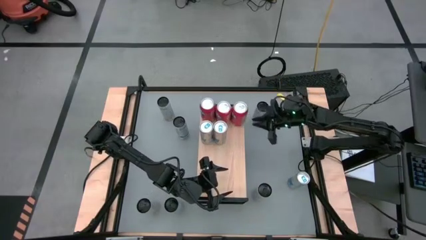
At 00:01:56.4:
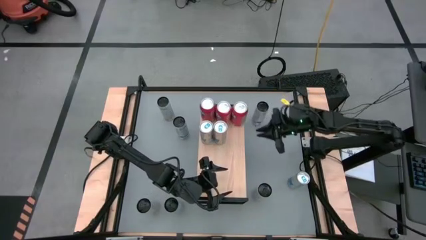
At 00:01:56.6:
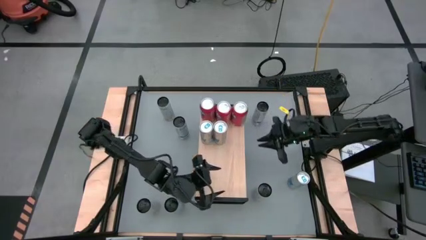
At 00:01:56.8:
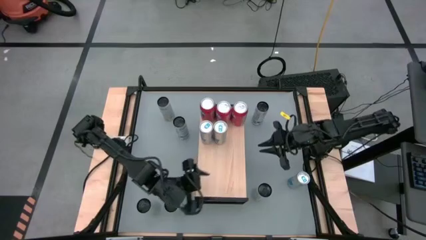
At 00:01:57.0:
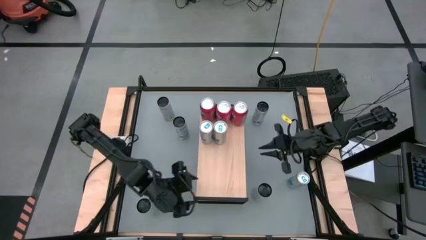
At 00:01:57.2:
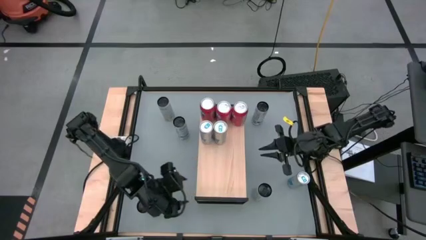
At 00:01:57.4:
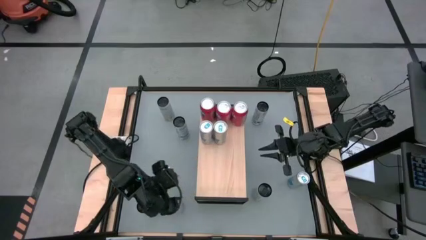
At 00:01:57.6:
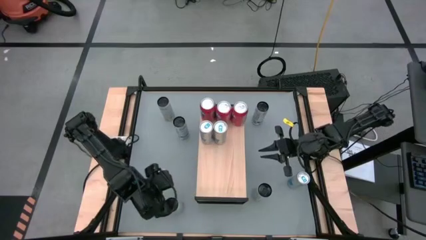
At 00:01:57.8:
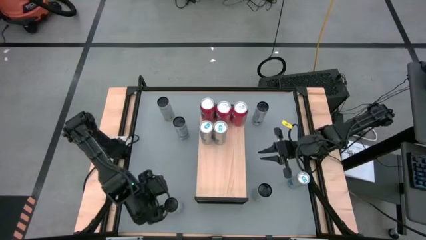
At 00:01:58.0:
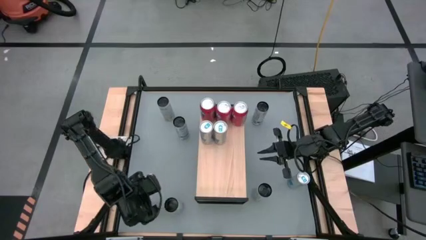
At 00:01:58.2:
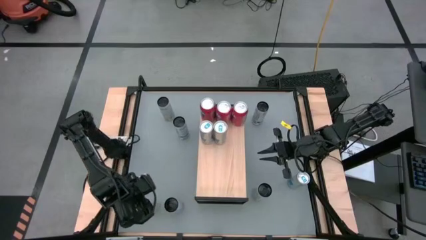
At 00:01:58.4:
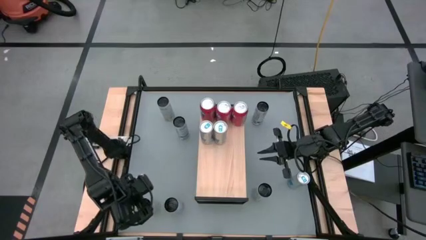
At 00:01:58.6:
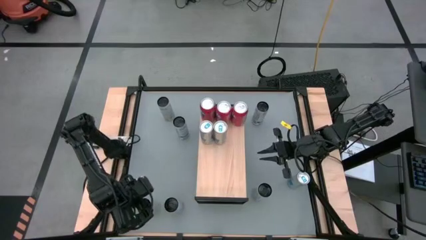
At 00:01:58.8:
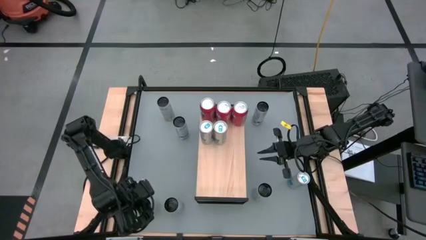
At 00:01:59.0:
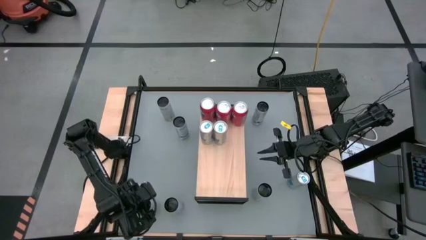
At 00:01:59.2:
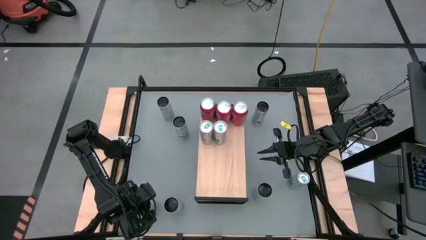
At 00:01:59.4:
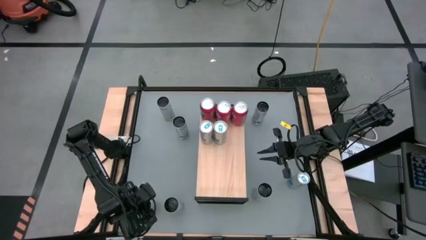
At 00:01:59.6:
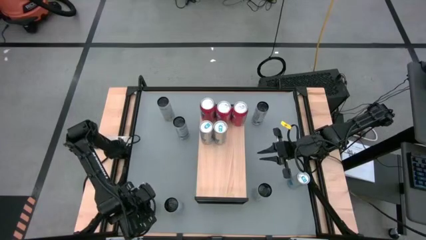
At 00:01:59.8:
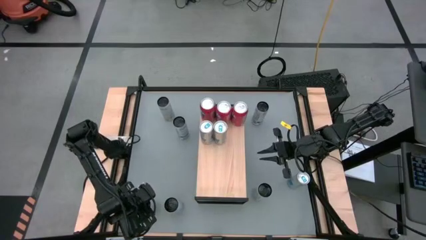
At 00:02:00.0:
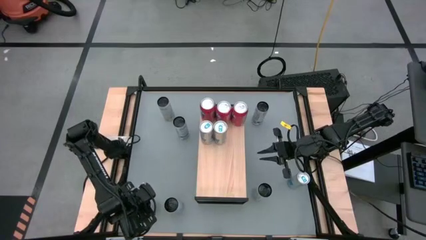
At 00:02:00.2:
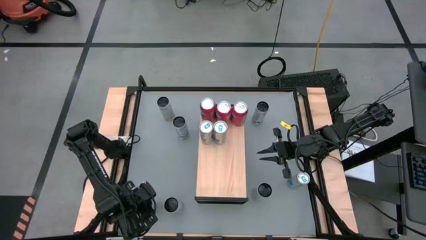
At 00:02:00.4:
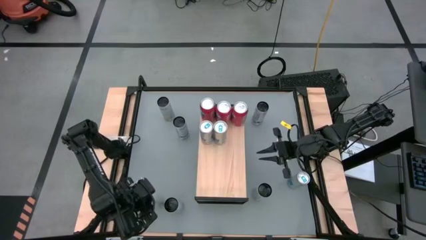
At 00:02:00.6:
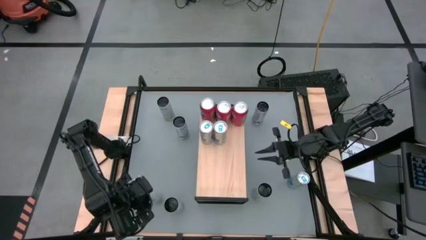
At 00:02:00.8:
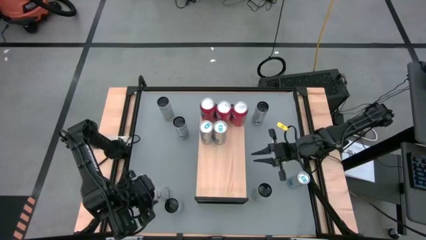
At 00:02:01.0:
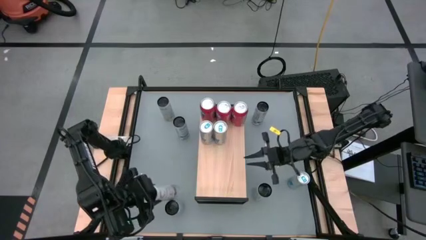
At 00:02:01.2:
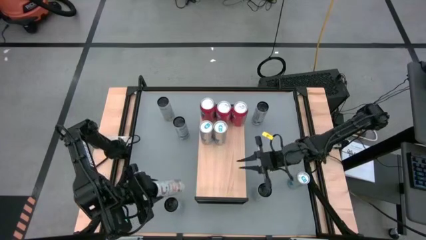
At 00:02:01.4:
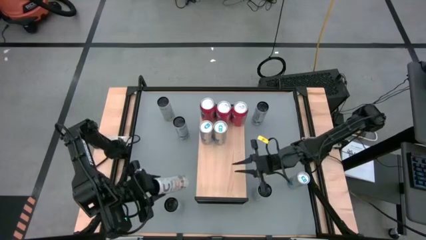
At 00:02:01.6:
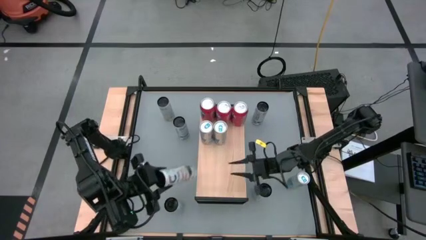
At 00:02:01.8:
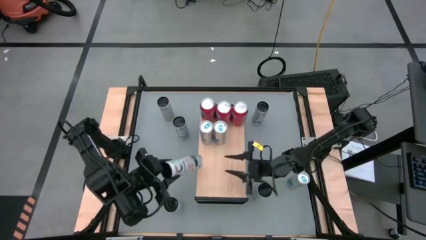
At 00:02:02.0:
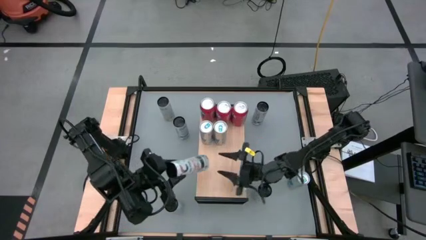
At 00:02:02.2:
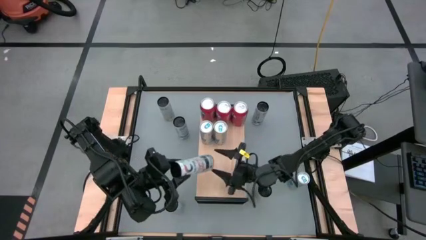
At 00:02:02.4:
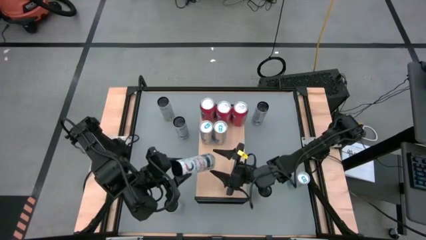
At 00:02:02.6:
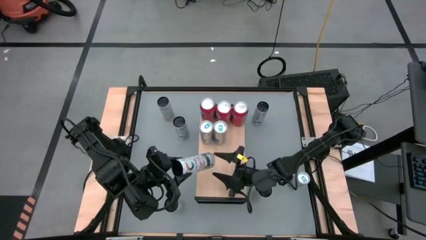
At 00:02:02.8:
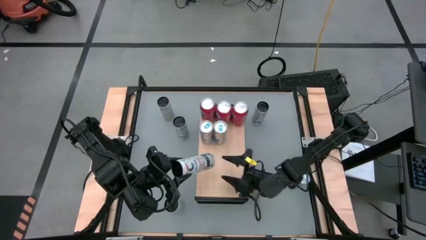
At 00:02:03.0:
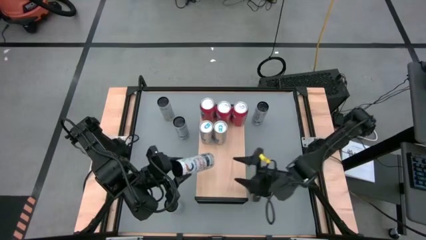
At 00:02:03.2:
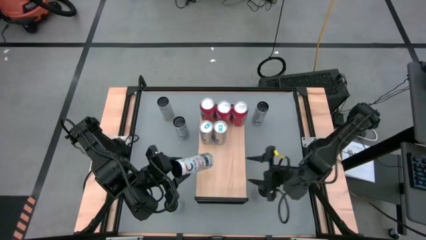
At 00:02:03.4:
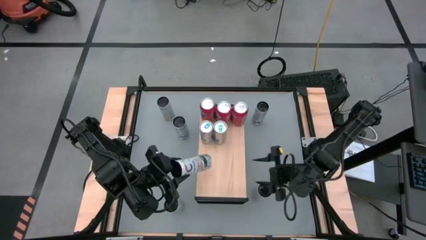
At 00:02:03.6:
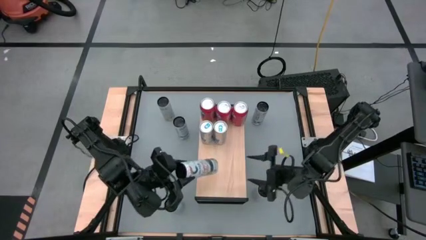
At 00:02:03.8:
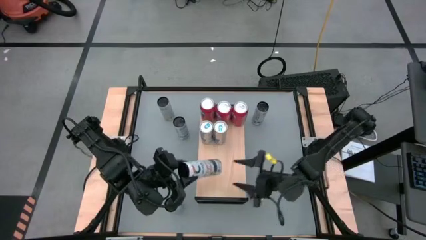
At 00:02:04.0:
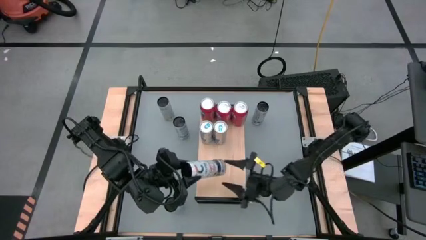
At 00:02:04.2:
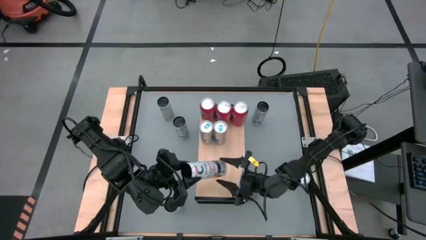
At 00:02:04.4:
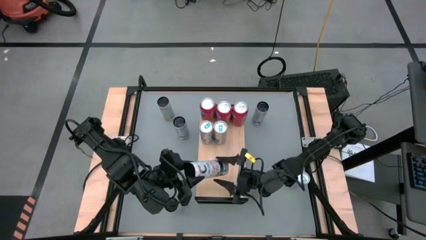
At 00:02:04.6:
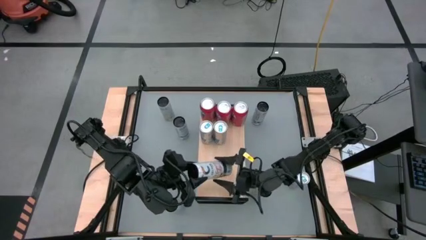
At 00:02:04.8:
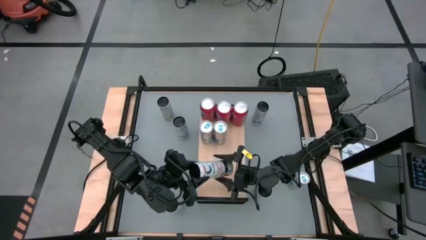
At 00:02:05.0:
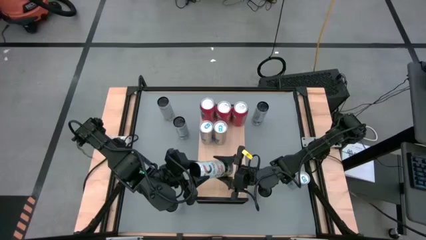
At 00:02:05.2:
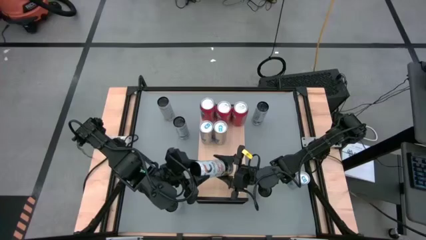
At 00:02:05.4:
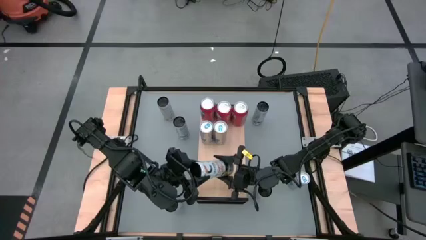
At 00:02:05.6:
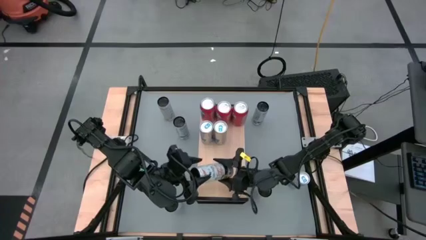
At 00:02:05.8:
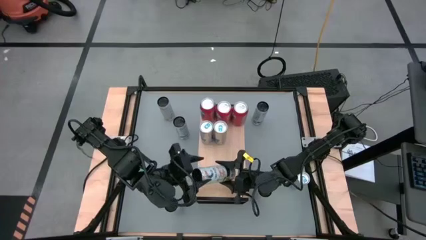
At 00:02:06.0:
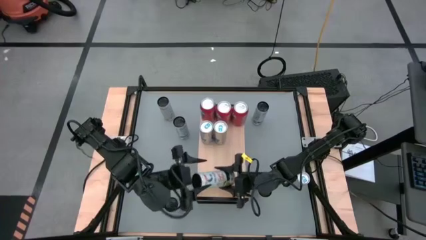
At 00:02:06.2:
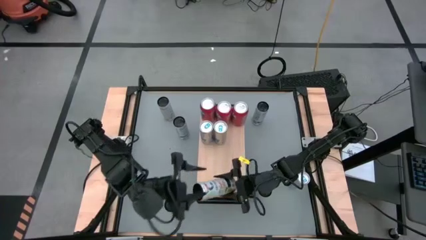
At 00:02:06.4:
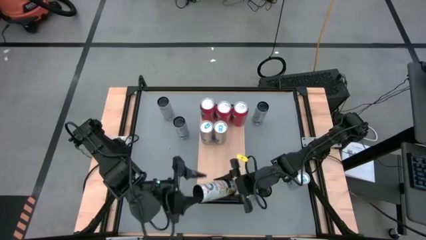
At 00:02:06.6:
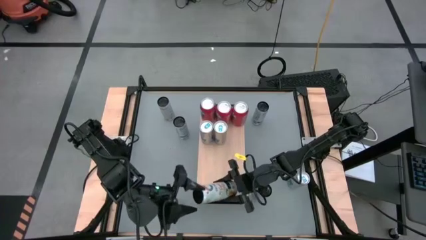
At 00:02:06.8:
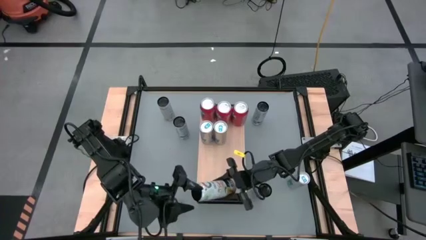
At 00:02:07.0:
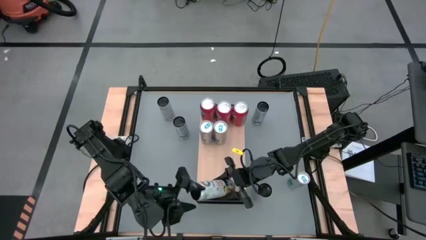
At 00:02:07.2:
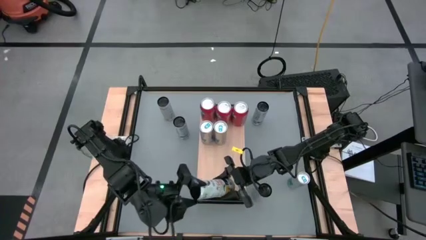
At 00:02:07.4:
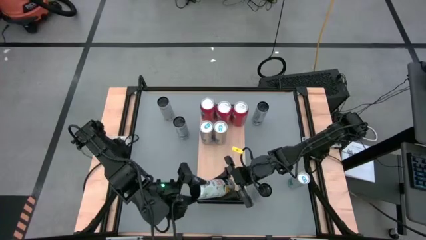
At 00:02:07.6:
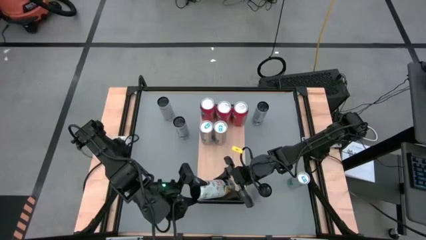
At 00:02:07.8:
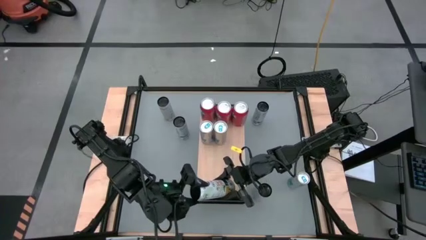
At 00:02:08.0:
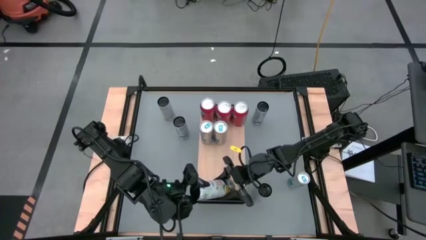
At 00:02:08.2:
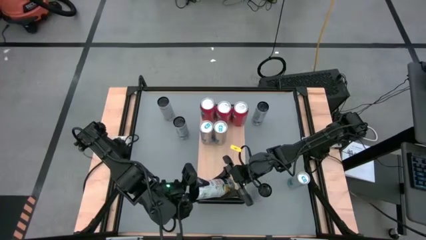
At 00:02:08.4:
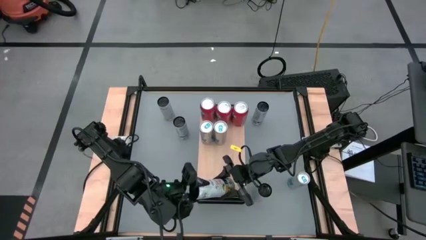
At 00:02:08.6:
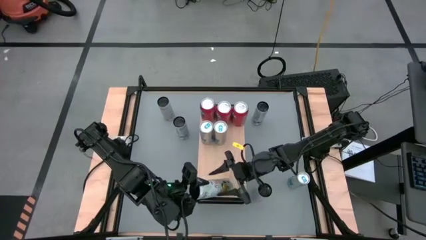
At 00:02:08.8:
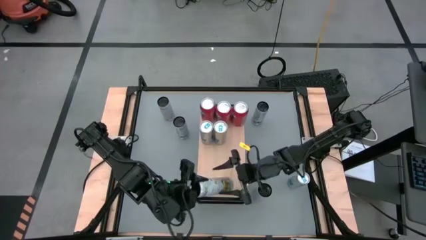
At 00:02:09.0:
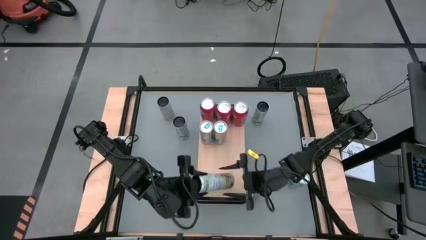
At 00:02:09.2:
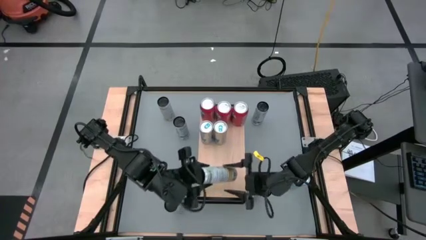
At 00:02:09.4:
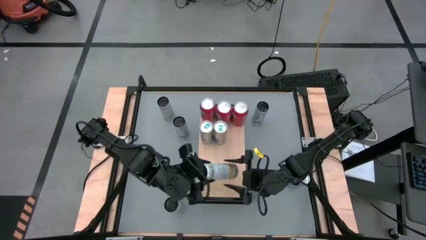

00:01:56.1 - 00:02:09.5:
Task: Place canned beverage on shelf
Put the bottom left white soda can on the shelf aligned with the other blue soda can
